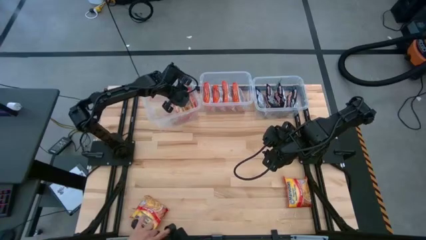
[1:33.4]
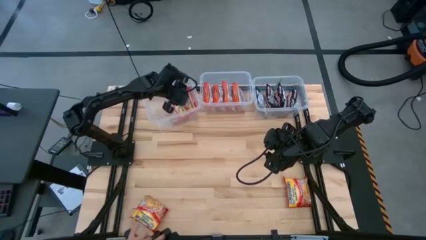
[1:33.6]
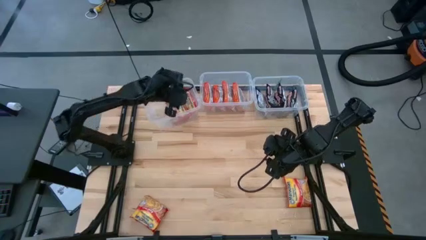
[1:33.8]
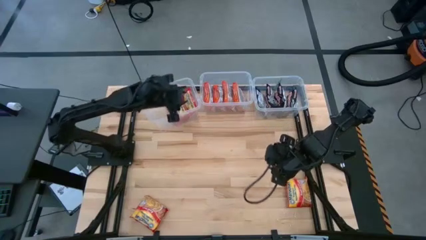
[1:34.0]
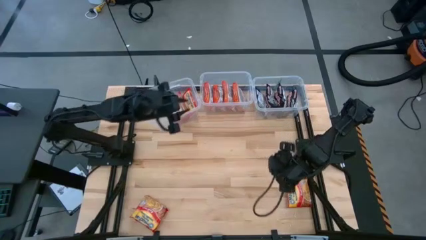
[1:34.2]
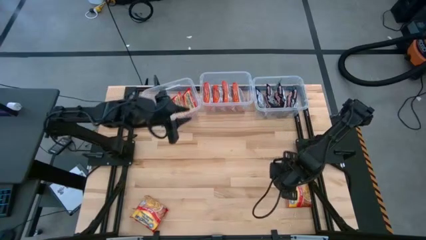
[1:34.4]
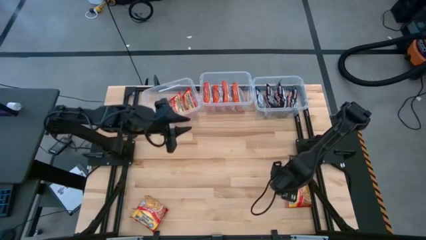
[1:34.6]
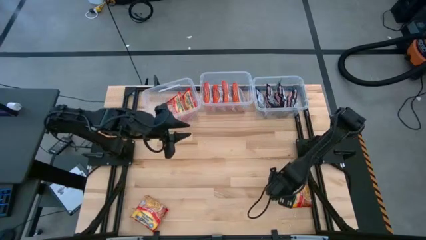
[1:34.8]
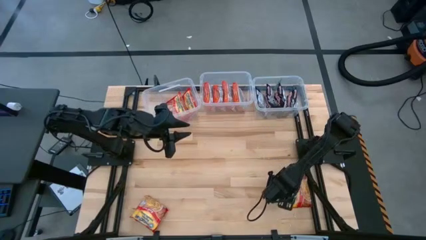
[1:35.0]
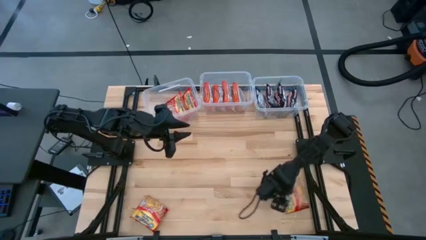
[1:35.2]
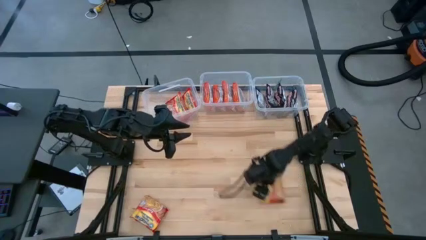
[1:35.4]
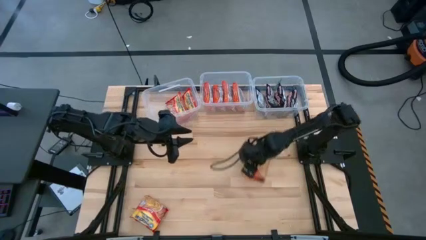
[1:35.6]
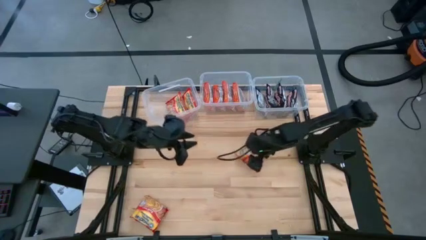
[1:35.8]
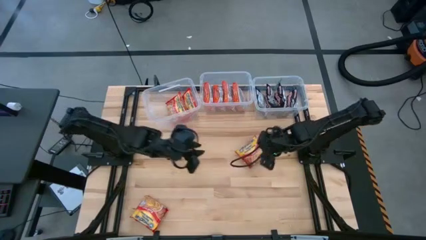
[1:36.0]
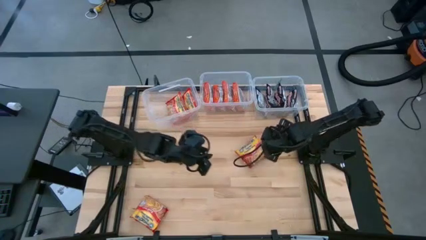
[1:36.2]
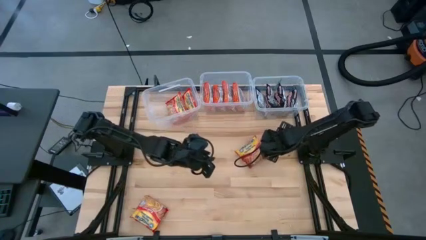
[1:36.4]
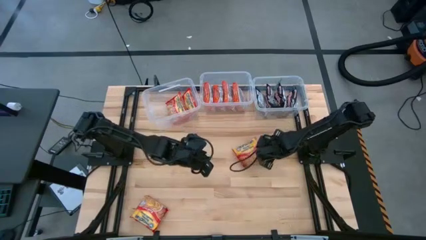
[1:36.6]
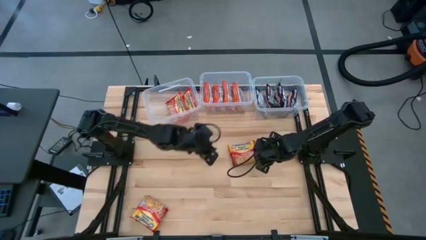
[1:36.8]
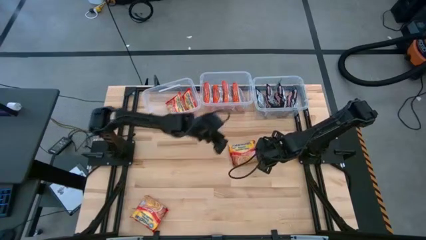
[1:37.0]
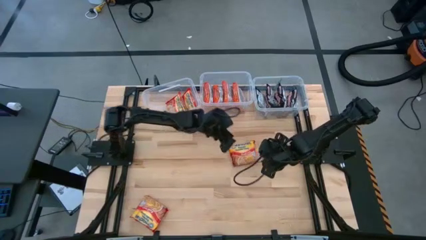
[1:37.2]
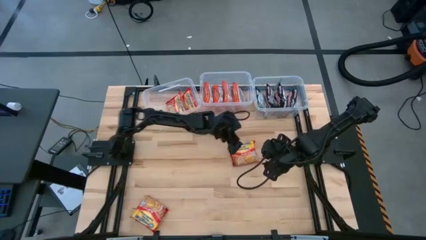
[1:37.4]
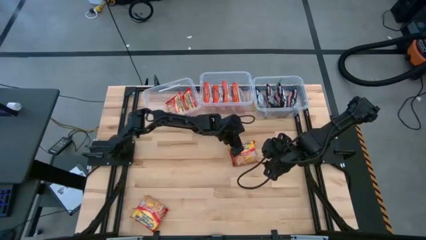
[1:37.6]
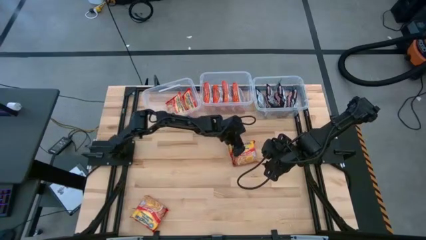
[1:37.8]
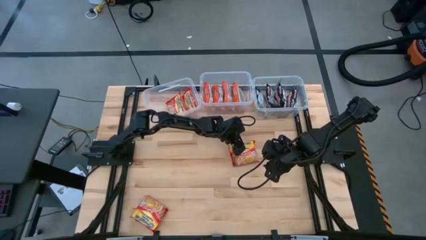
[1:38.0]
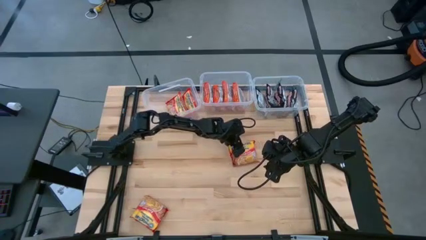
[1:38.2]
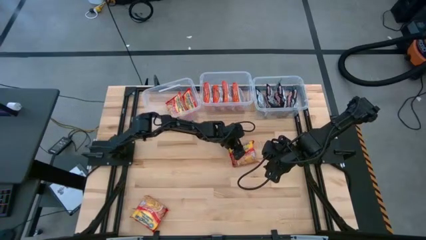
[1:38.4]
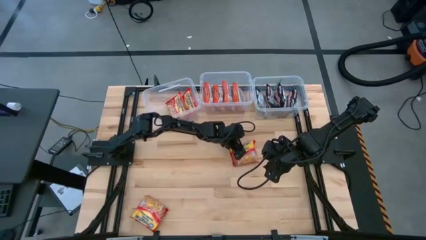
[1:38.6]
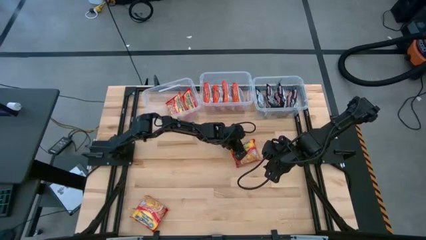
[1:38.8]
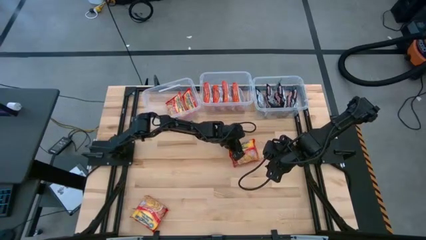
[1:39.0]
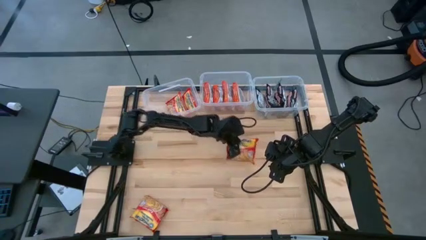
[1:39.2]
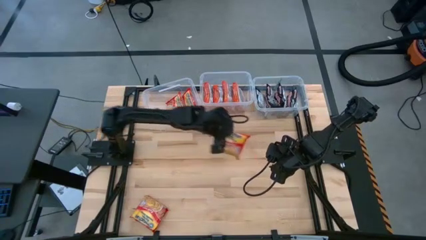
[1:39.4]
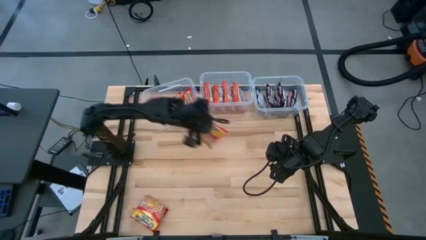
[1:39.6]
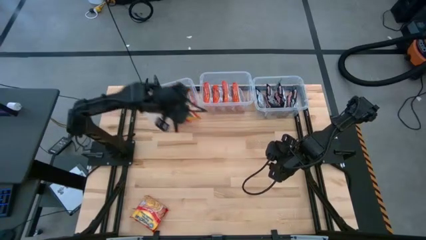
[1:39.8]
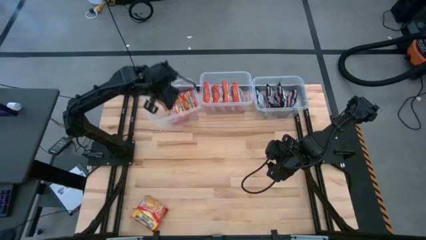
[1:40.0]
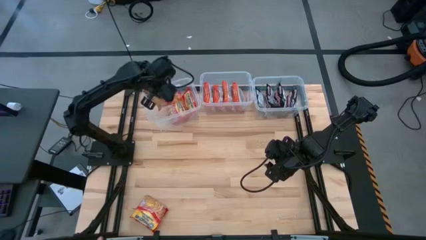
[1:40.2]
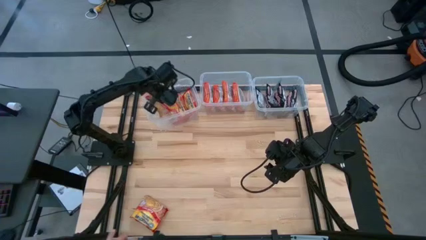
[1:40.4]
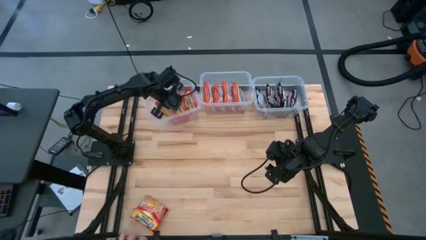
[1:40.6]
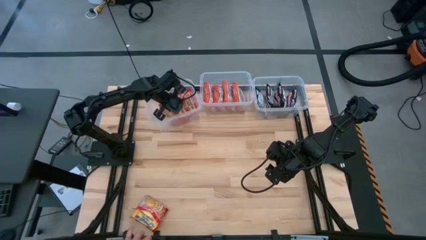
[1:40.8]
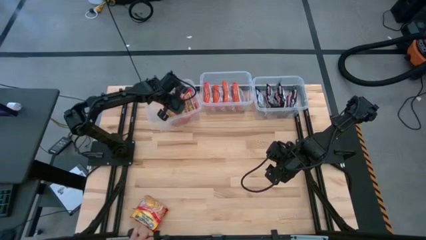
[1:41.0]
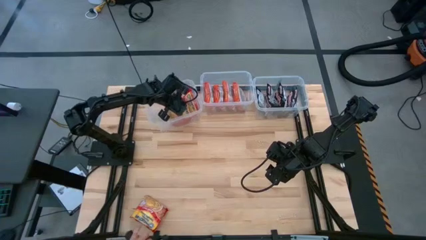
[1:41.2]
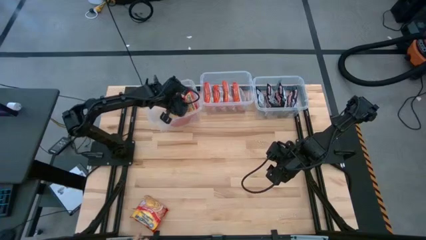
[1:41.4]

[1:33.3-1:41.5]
Task: Sort Maruchan noodles
Put the red noodle pack into the top left transparent bin

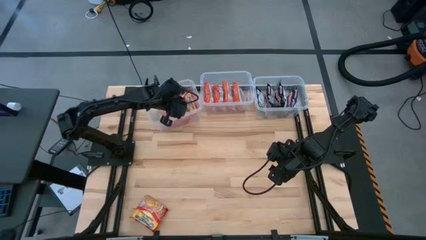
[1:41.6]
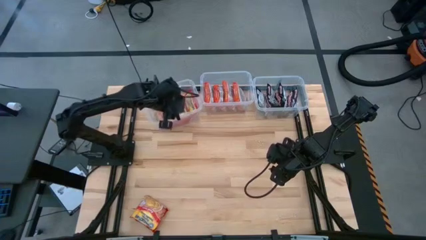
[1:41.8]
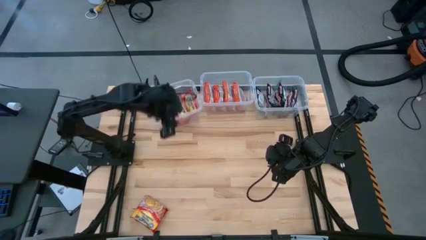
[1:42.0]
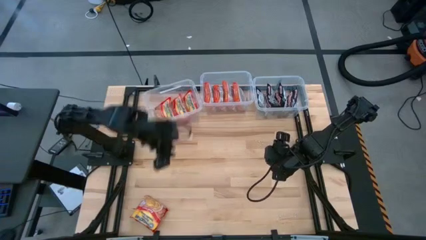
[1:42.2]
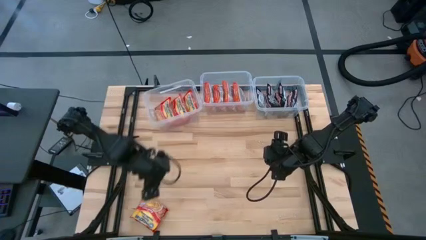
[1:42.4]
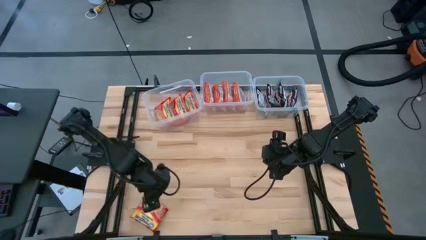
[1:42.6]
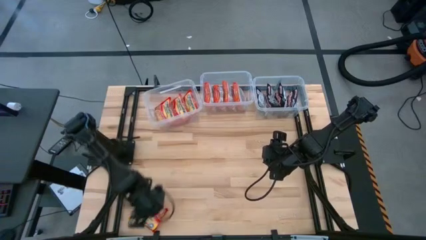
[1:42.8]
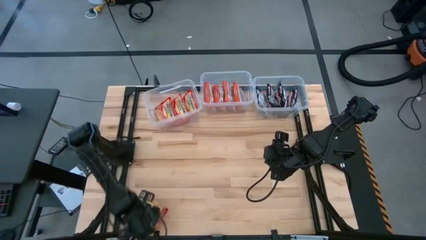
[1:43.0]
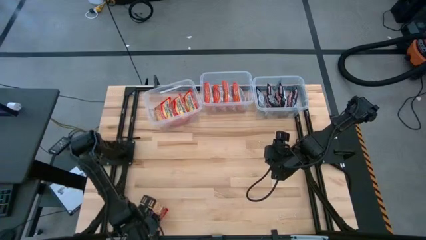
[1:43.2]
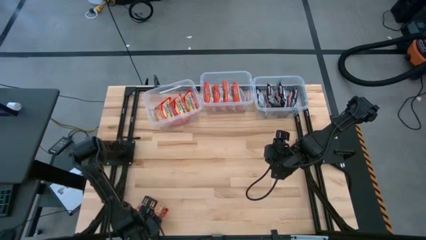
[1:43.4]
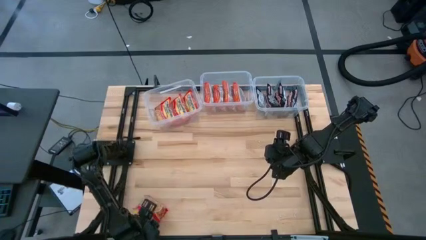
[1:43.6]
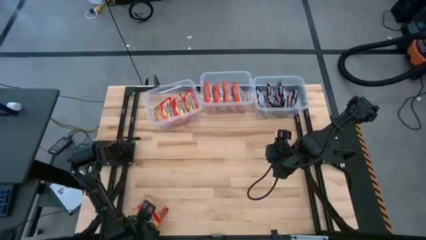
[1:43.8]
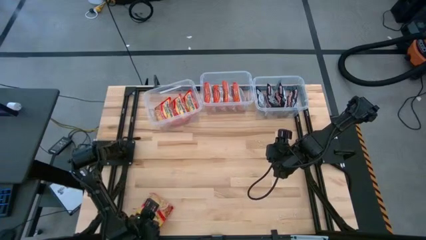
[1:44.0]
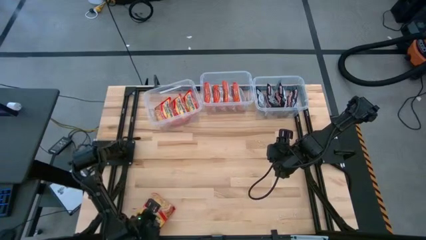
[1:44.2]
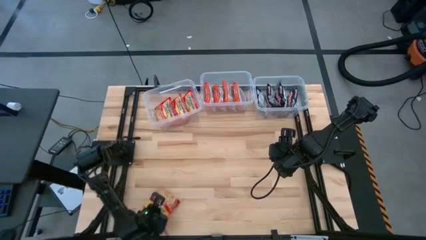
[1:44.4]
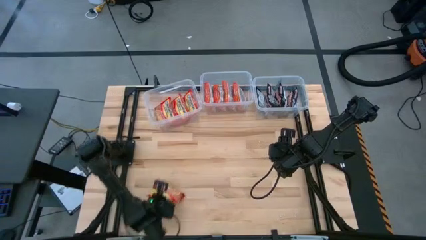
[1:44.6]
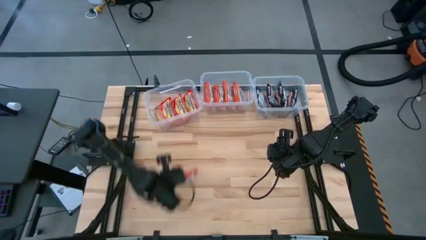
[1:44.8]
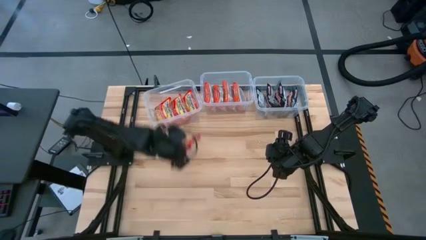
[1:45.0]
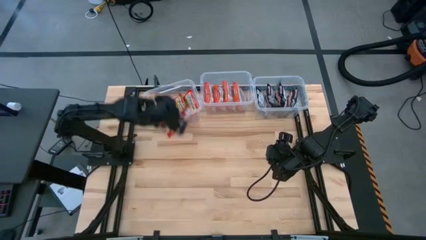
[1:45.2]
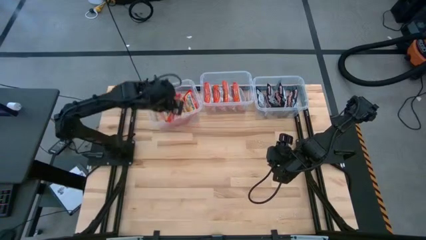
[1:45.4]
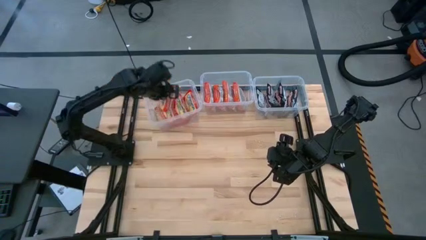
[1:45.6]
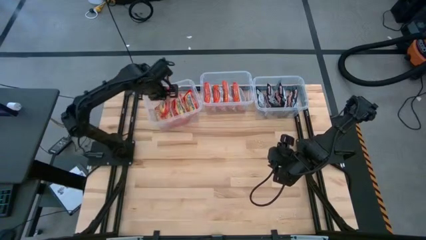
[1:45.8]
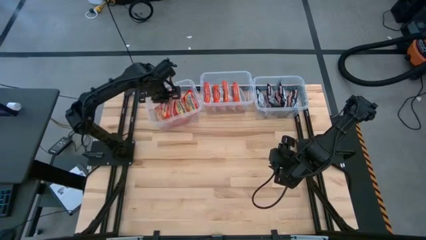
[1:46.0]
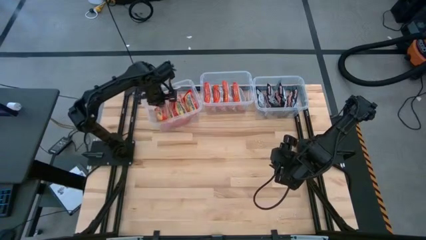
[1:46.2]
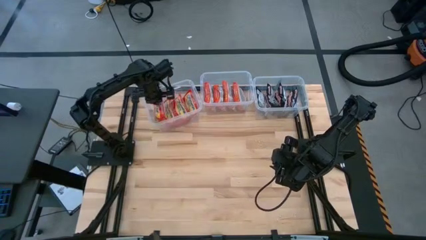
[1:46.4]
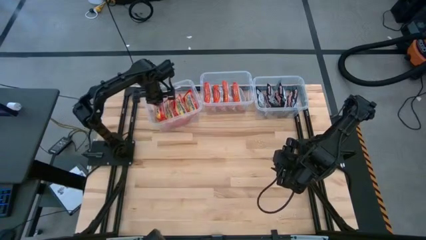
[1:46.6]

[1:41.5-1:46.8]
Put the red noodle pack into the top left transparent bin

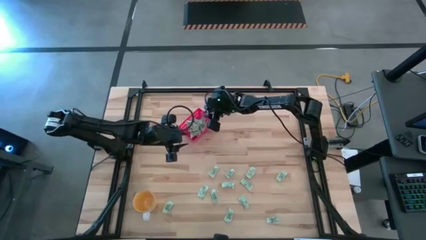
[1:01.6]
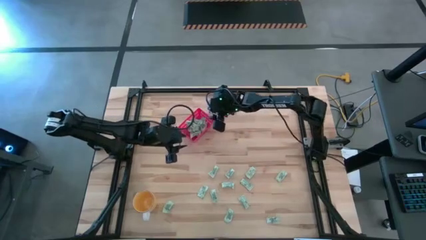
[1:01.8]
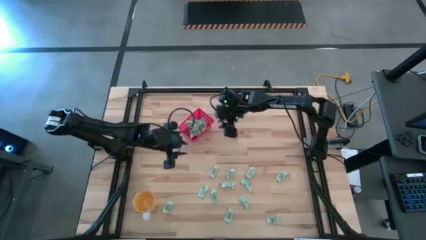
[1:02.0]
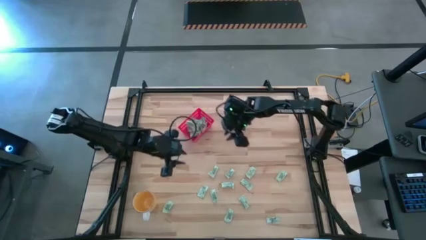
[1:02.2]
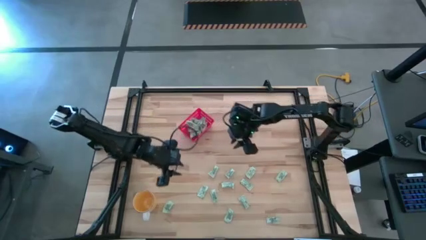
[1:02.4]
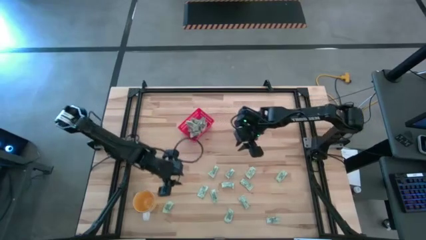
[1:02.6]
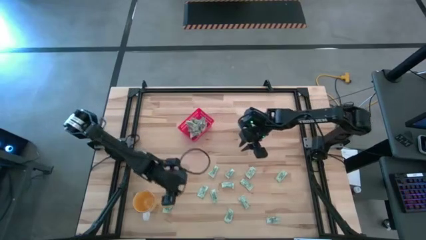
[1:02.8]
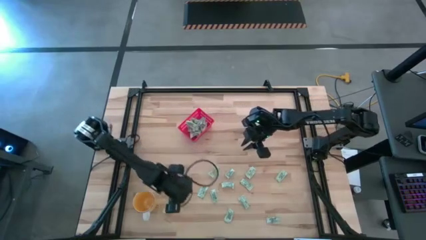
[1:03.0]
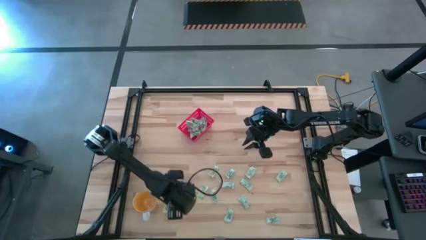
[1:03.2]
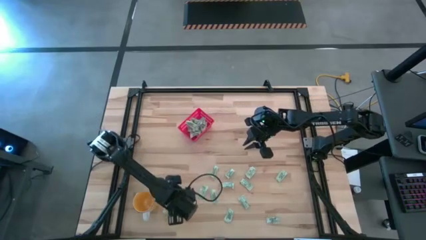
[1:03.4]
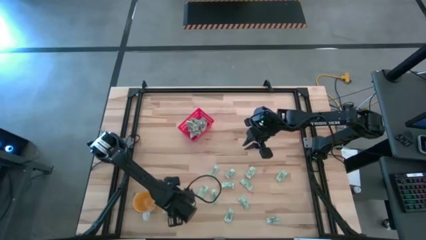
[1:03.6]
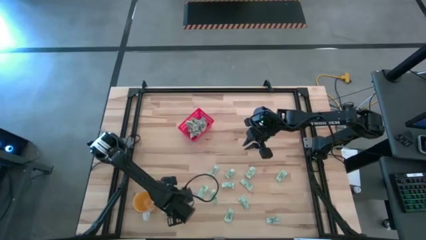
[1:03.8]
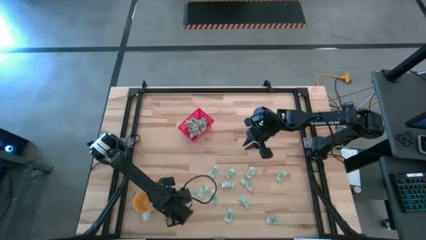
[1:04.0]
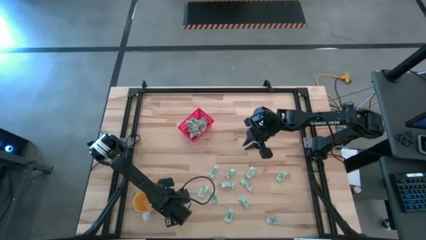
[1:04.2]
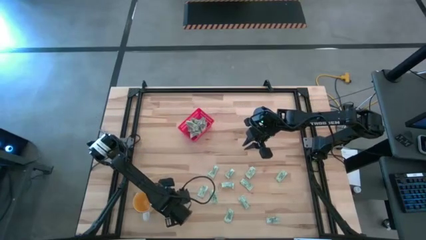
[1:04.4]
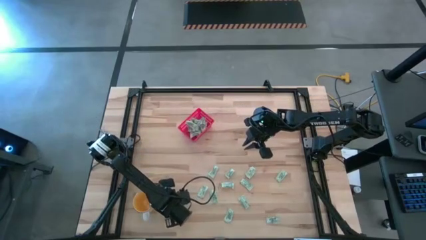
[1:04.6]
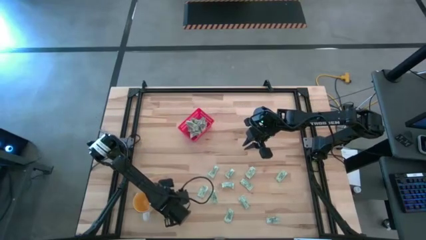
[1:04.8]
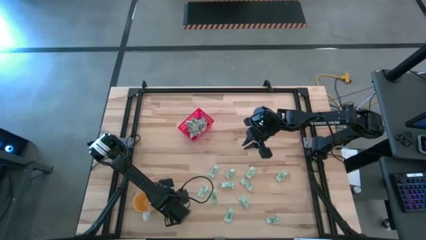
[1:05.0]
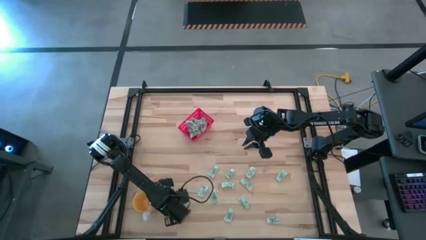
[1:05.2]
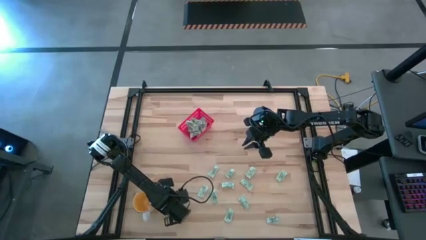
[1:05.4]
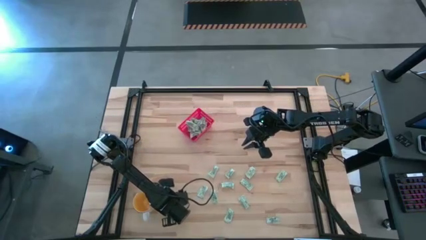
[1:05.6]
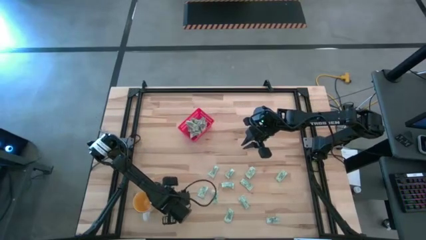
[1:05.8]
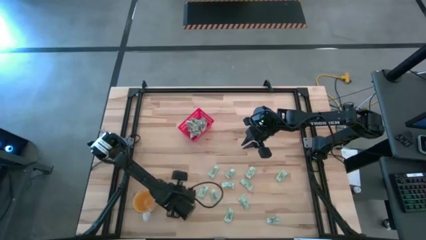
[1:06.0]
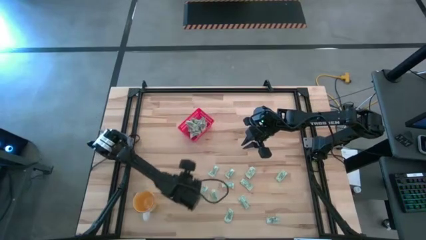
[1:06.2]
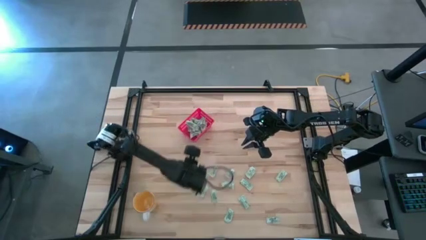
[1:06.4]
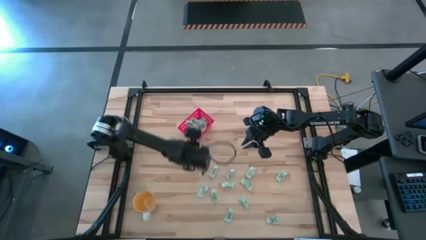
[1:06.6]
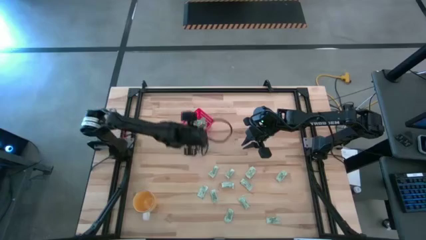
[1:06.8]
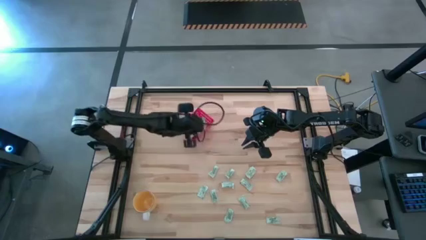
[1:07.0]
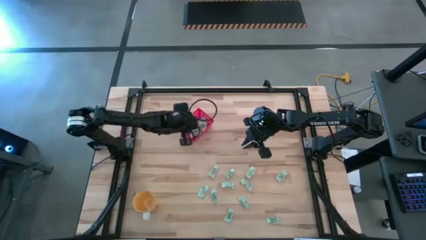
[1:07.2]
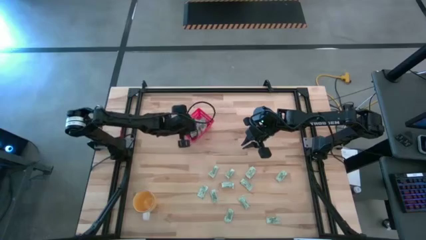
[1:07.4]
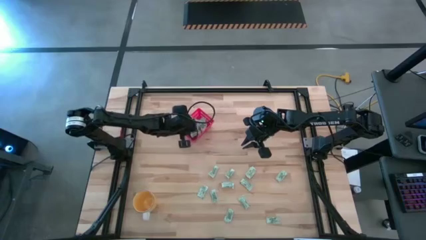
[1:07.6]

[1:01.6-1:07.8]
Task: Pick and place Stevia / Truvia into bins
Put the white stevia packet into the red bin
